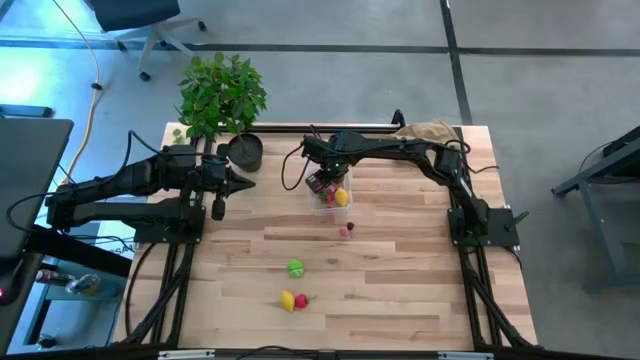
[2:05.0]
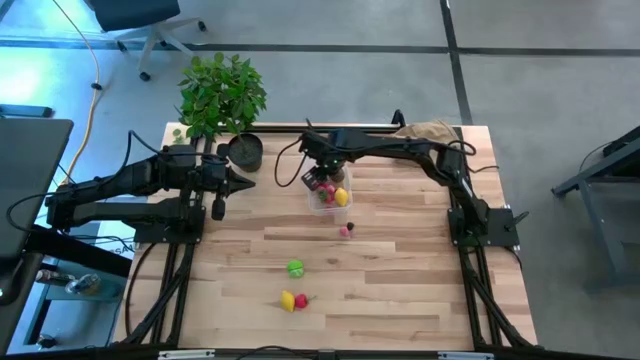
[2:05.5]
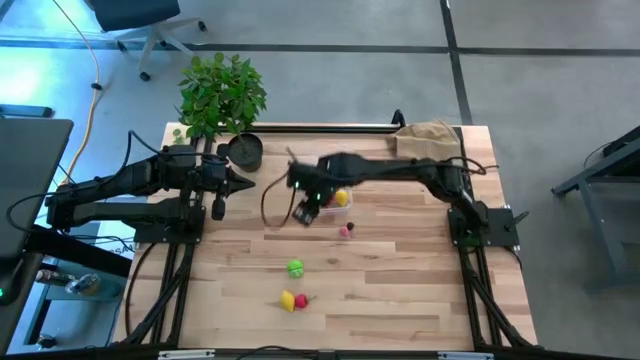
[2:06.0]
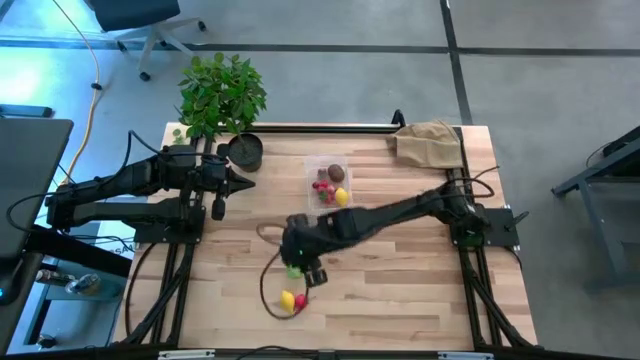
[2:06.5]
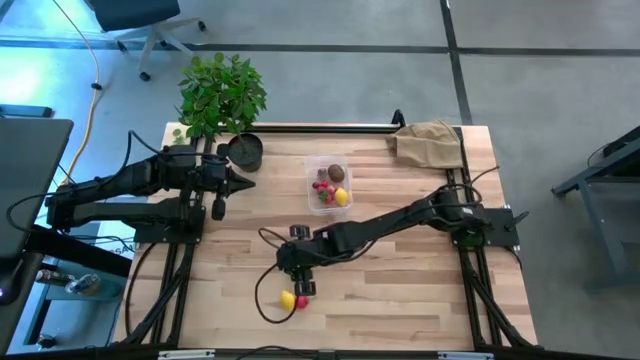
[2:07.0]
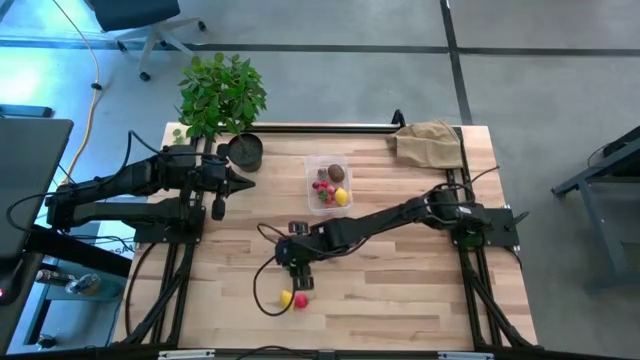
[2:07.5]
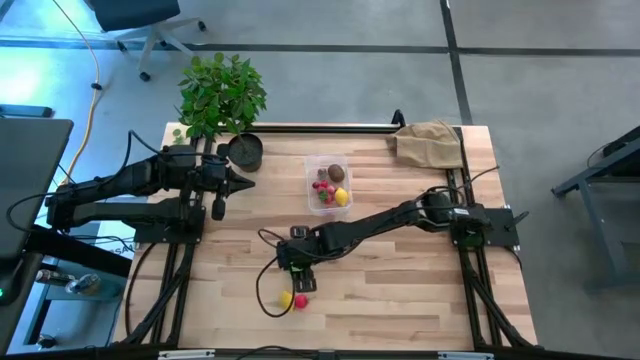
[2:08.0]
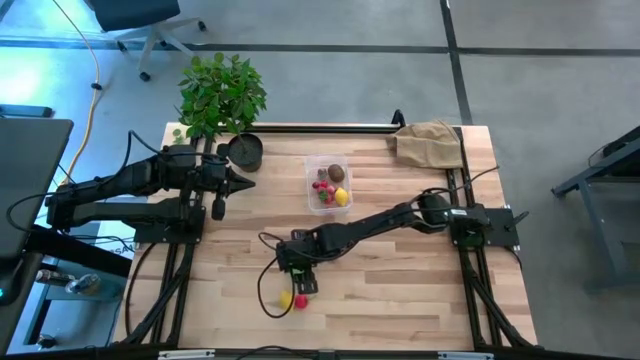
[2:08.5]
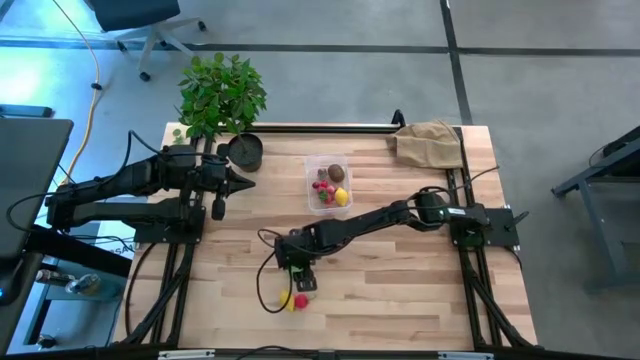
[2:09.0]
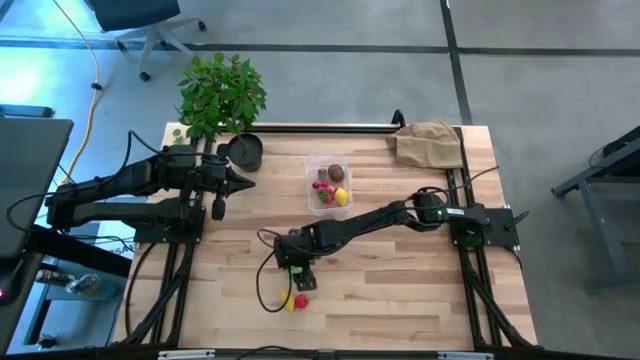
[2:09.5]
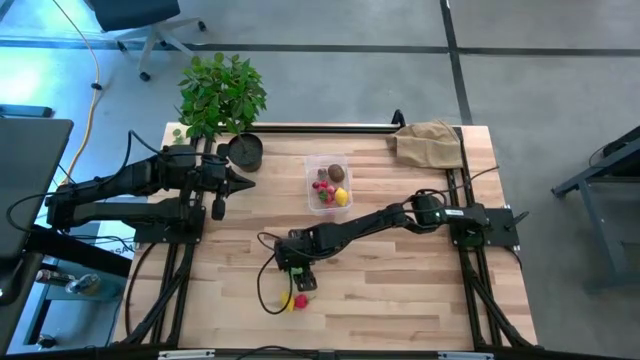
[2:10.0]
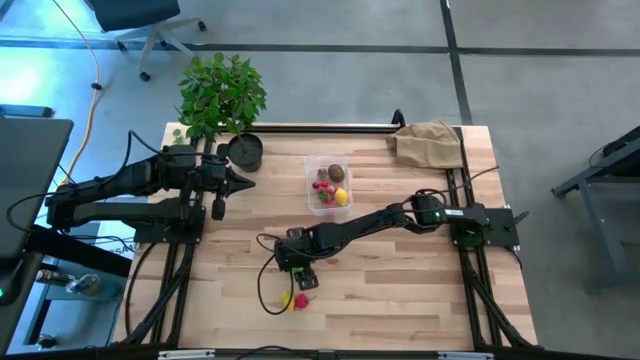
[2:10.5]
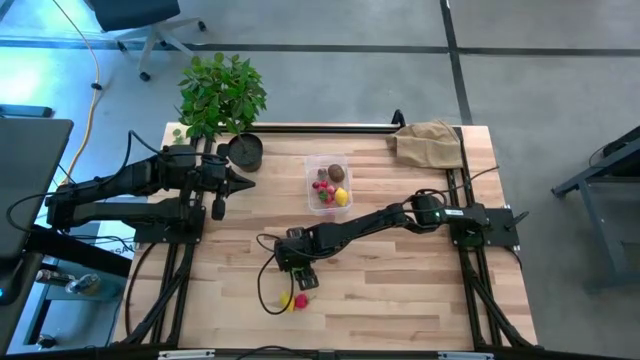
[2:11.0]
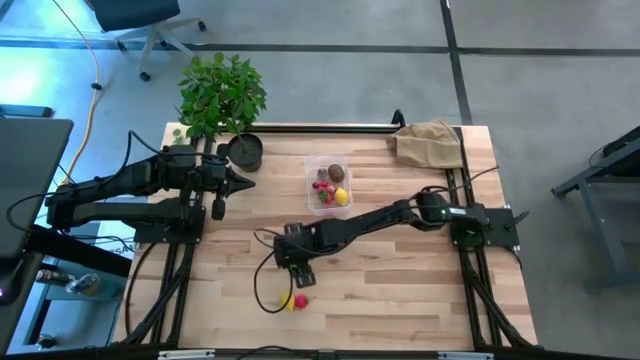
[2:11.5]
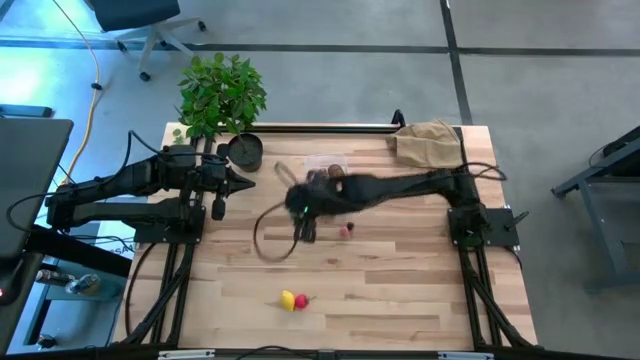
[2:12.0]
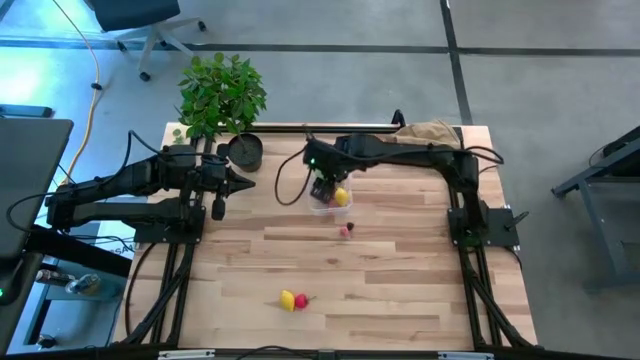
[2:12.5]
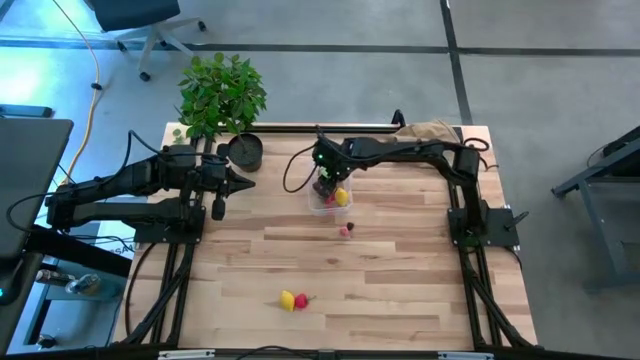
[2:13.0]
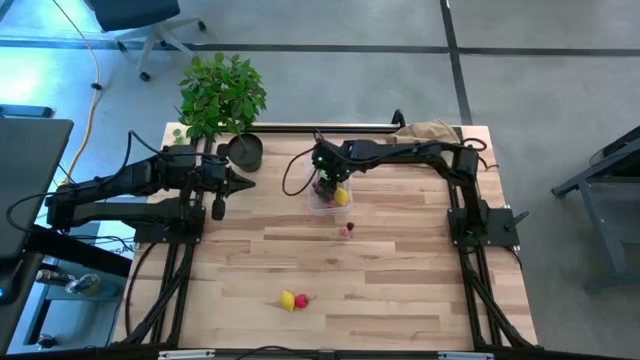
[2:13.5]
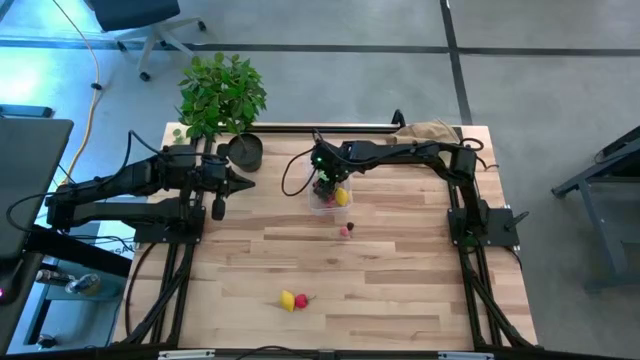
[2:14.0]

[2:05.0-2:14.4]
Task: Pick and placing Produce into tupperware
Put the green cabbage into the transparent bin

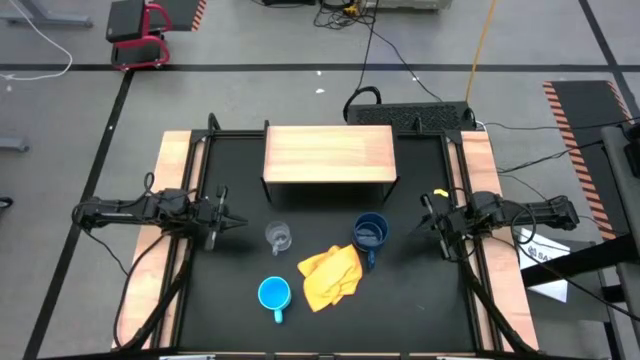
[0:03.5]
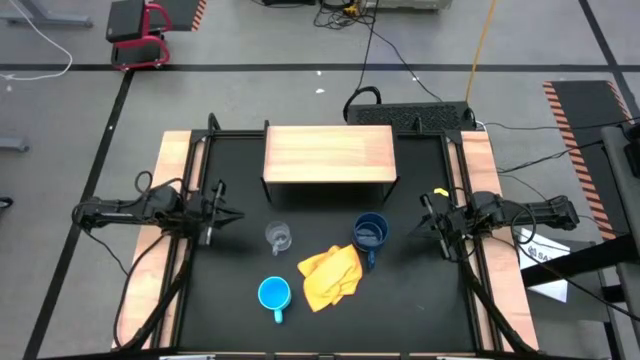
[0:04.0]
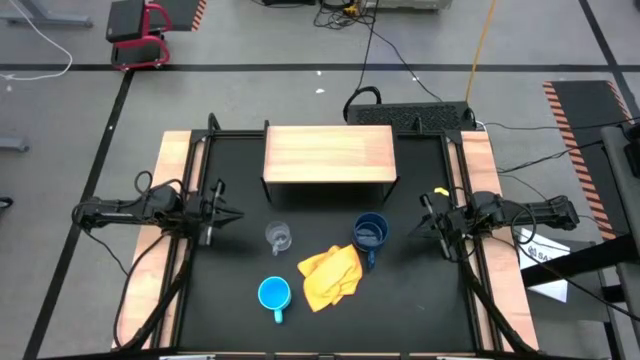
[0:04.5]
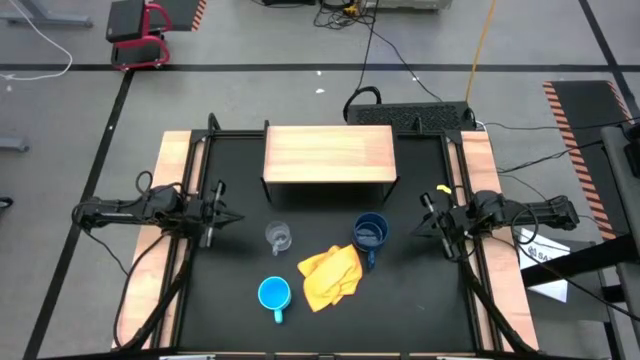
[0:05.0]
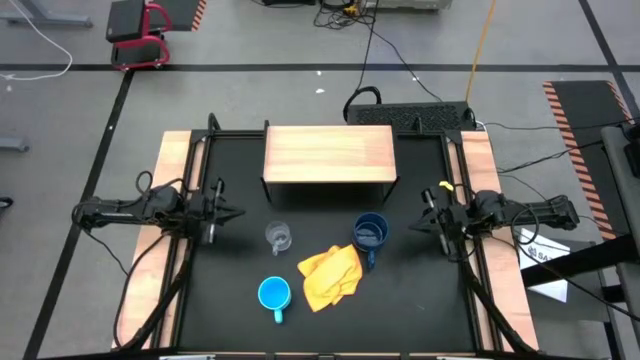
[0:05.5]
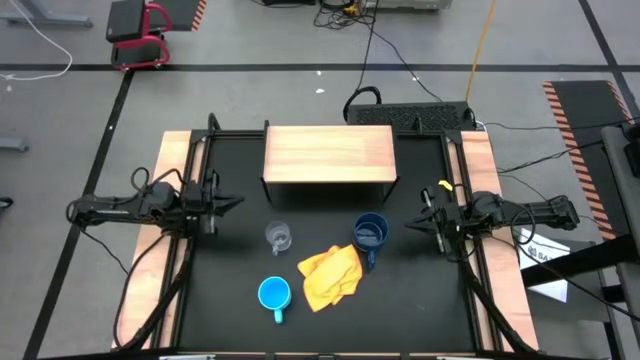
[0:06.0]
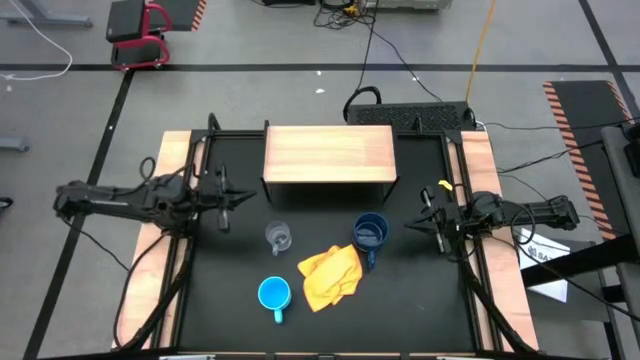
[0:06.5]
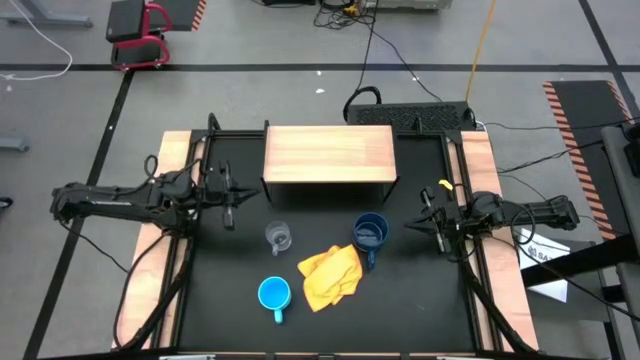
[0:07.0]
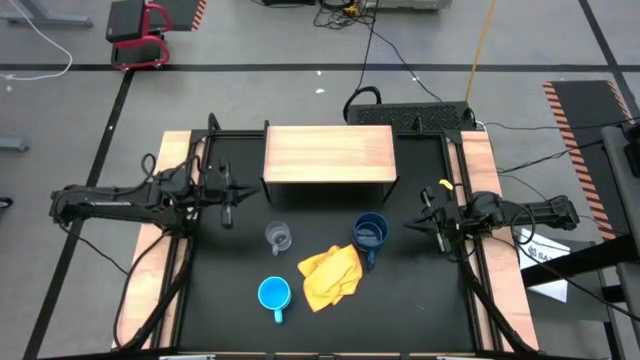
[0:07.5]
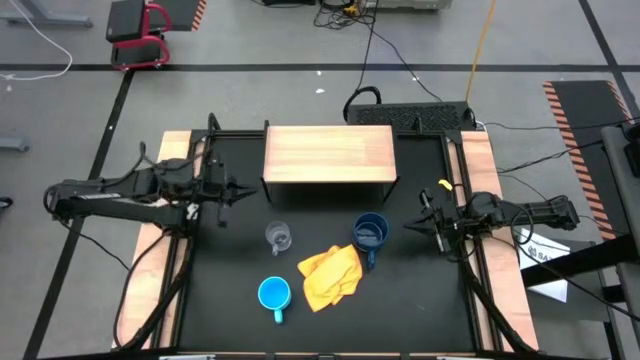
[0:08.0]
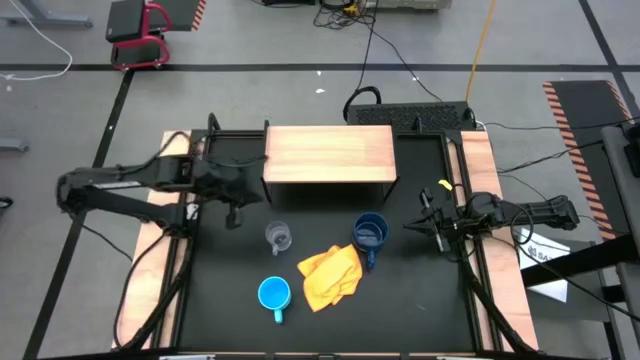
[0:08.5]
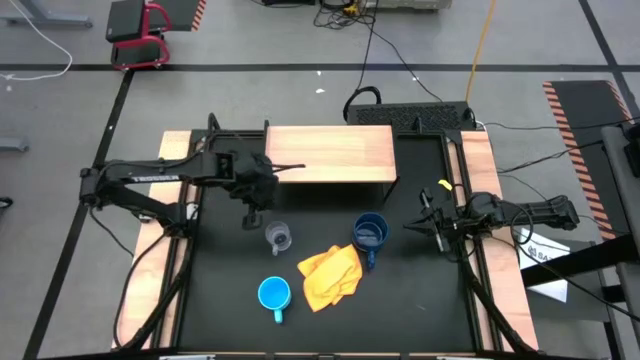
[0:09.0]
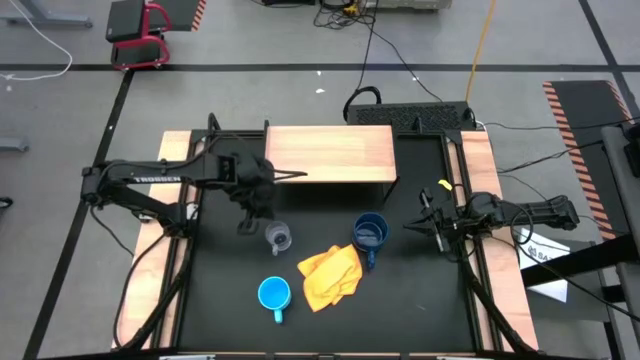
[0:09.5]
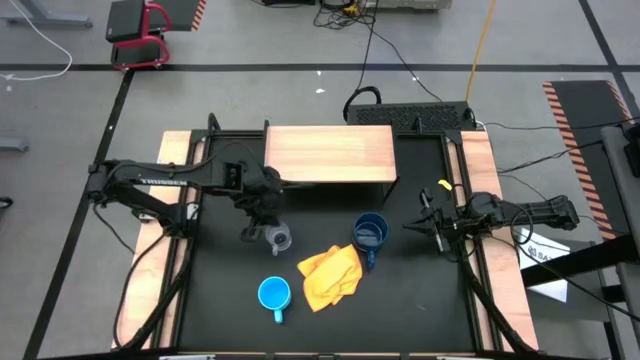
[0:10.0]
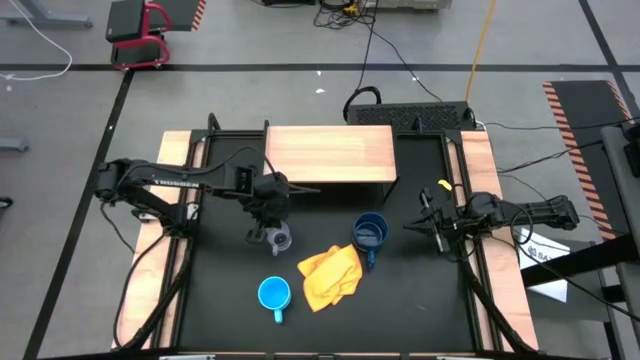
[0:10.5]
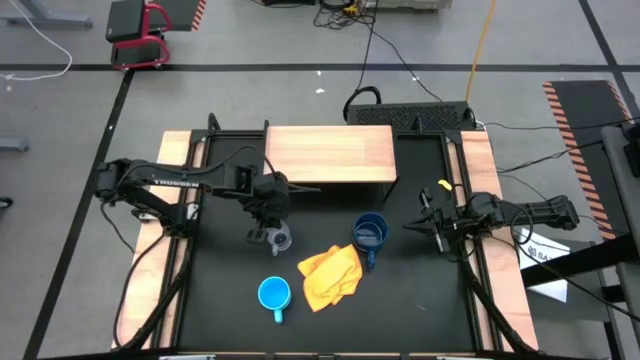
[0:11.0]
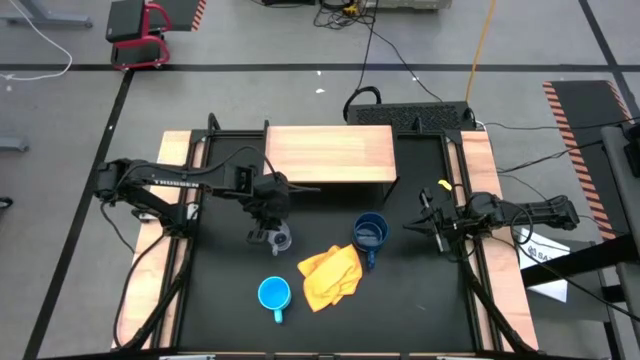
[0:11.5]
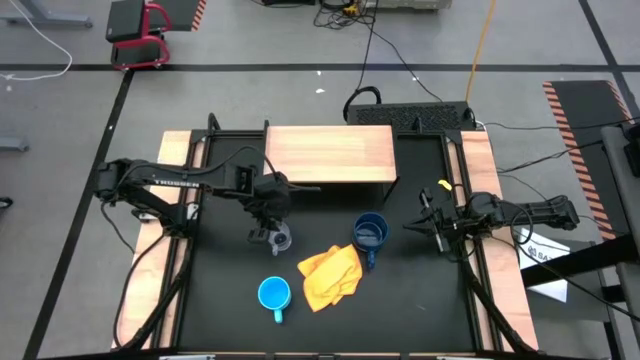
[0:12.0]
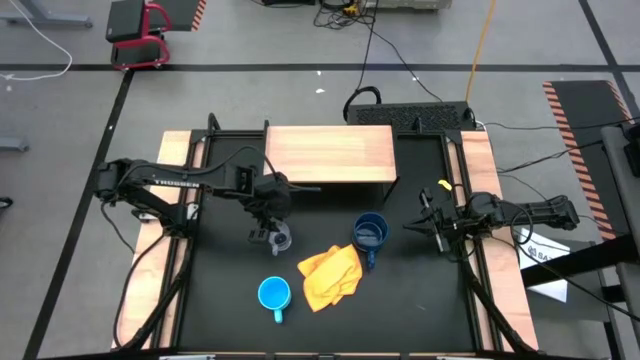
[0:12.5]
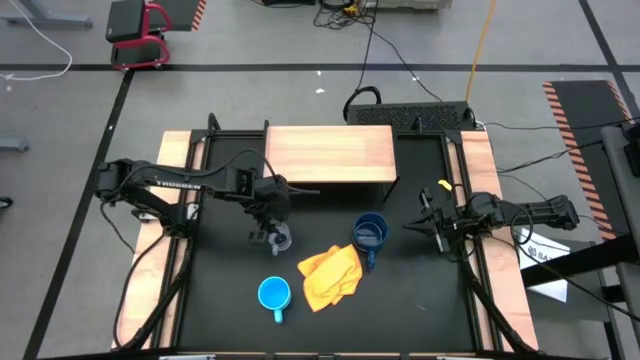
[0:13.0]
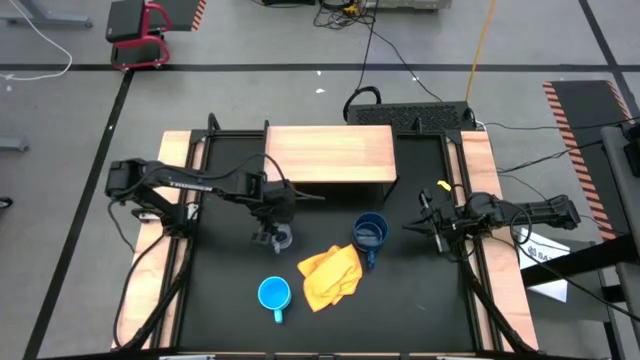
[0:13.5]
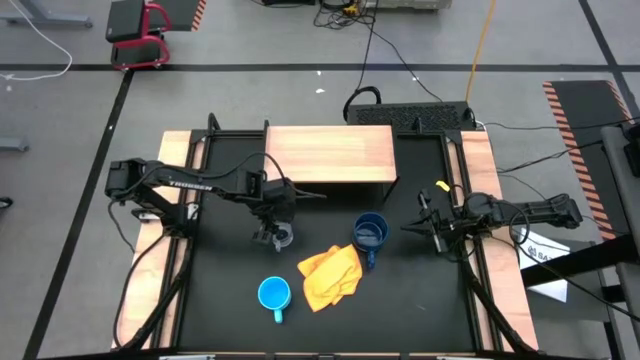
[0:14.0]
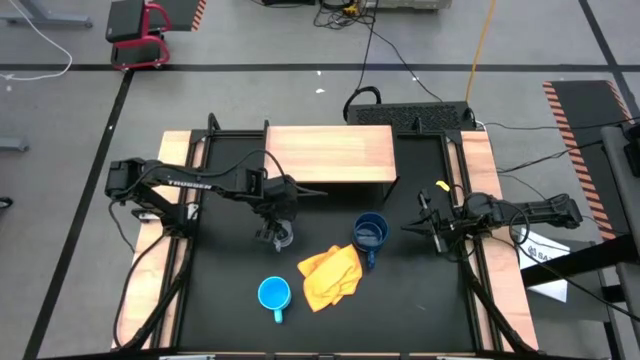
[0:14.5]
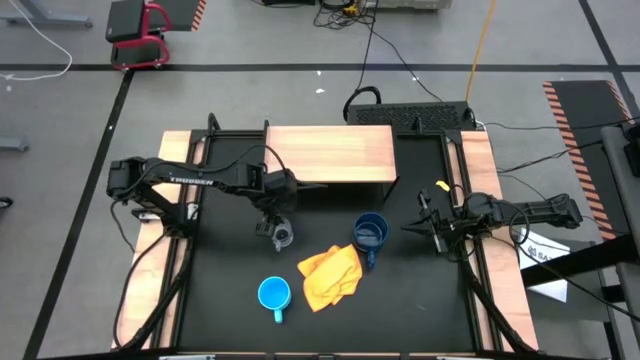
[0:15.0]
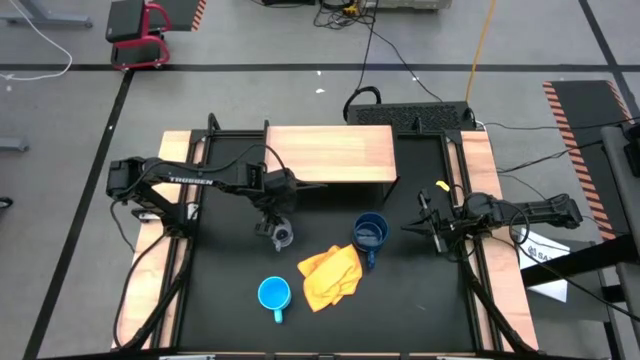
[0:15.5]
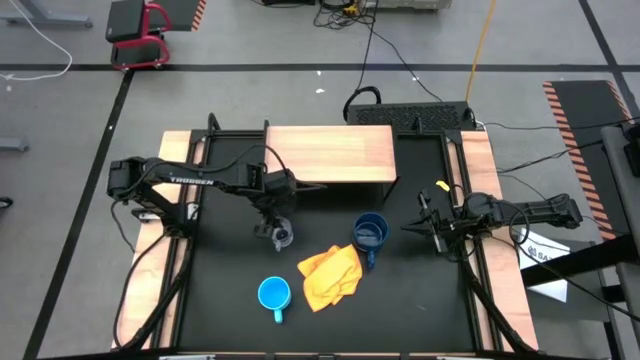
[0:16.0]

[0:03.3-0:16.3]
Task: Stack small to large cups/mugs on shelf
Put the transparent mug on the shelf
